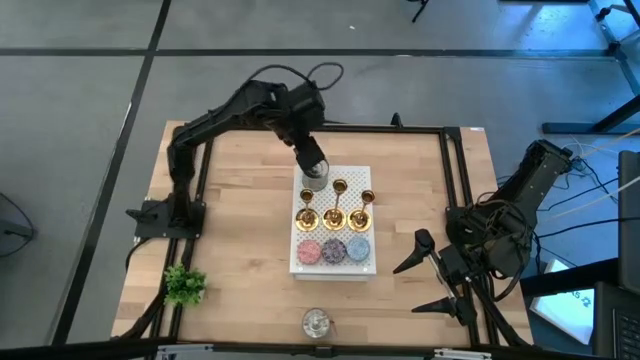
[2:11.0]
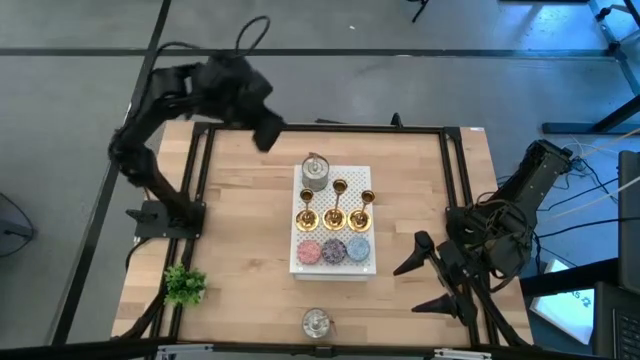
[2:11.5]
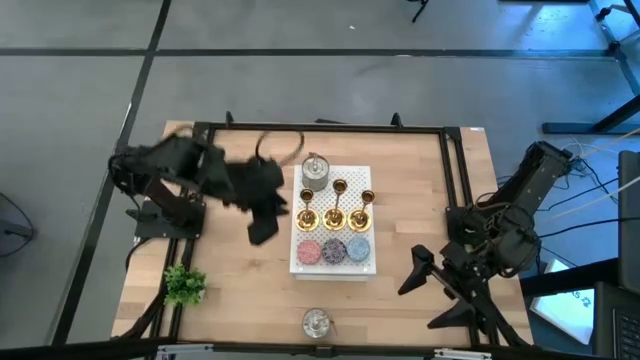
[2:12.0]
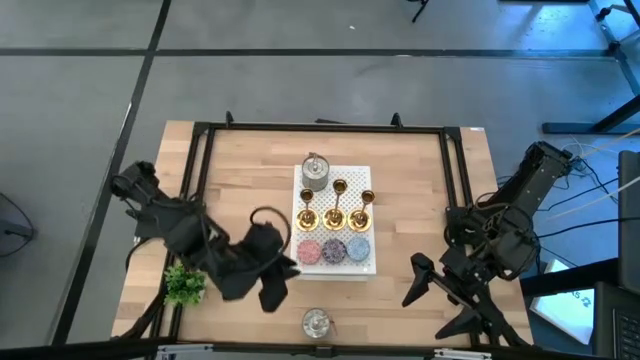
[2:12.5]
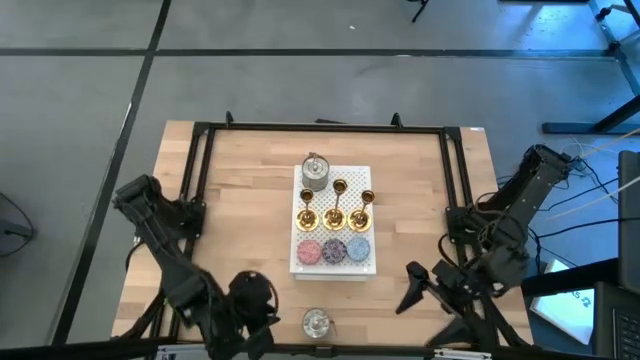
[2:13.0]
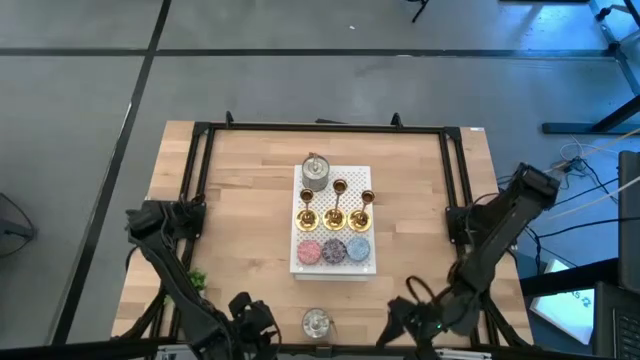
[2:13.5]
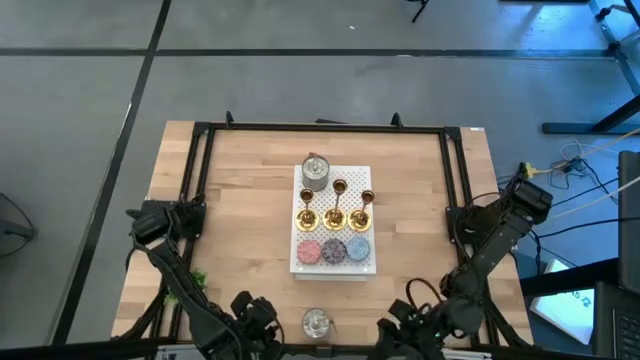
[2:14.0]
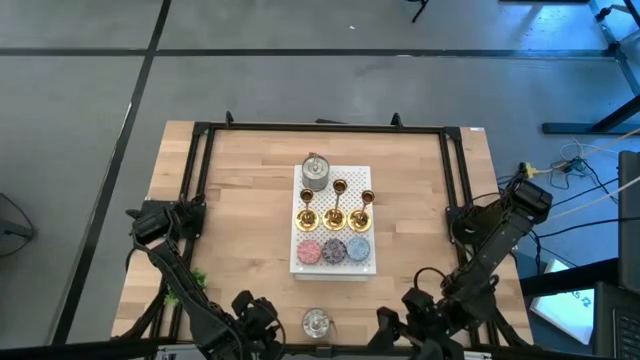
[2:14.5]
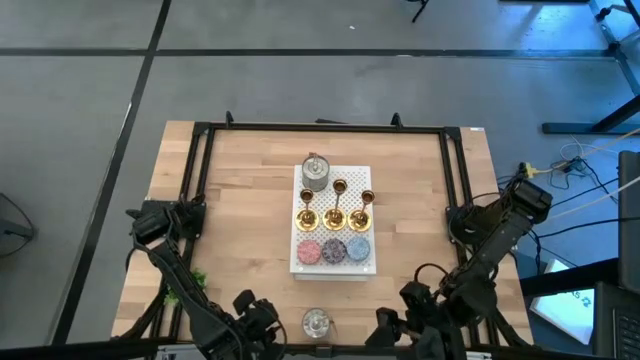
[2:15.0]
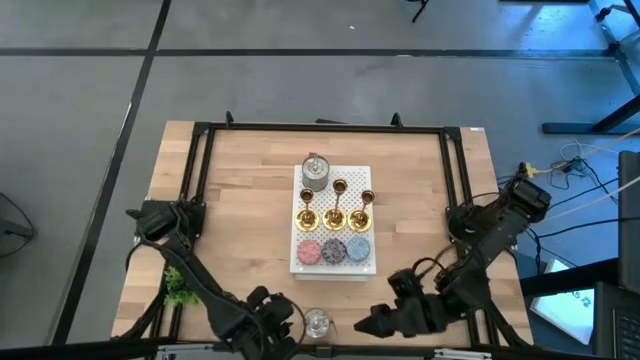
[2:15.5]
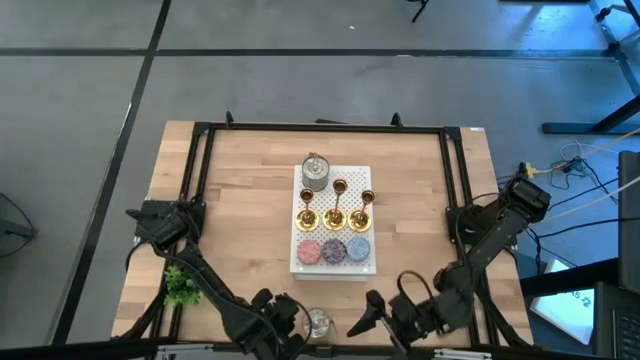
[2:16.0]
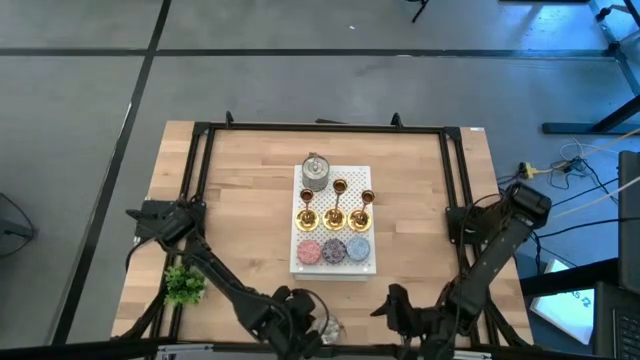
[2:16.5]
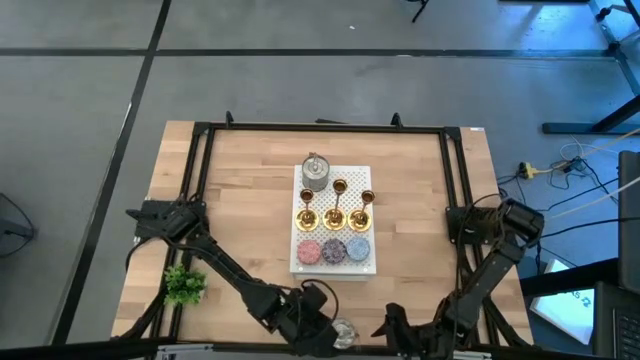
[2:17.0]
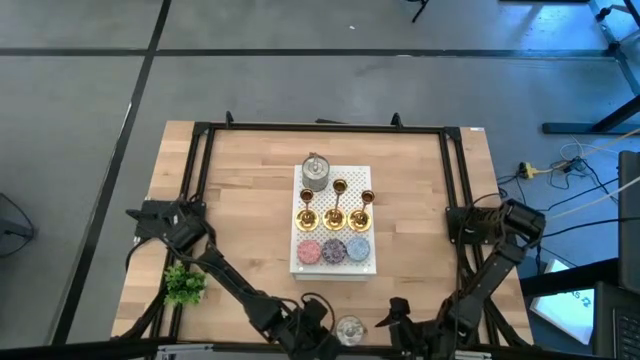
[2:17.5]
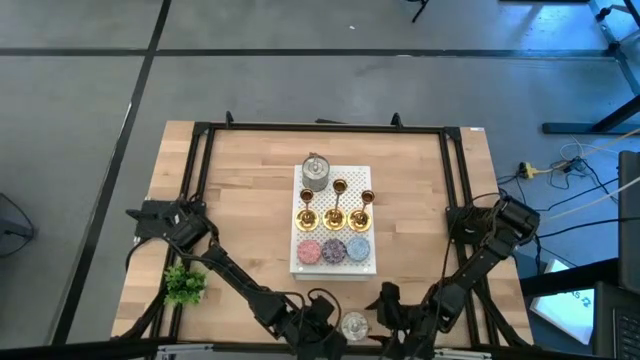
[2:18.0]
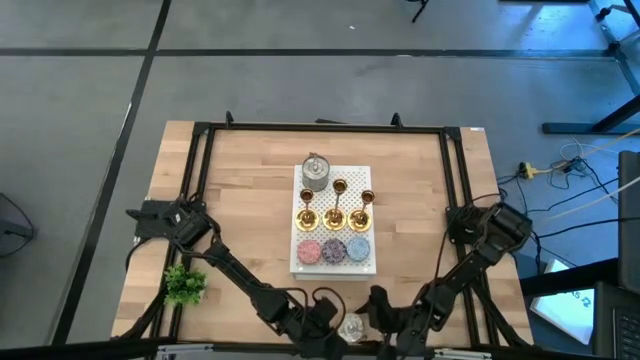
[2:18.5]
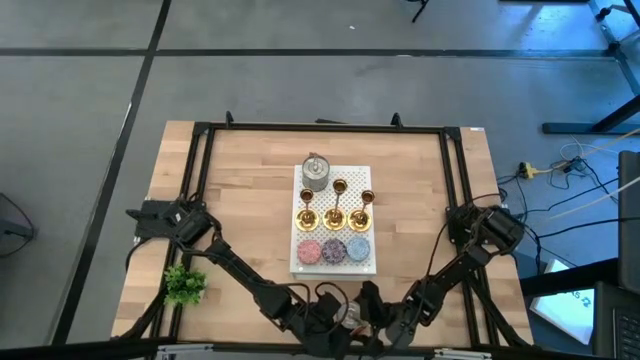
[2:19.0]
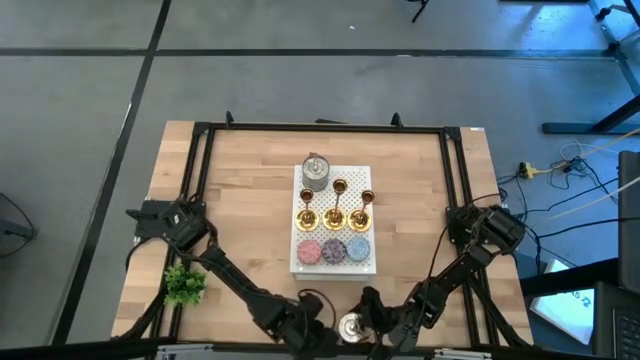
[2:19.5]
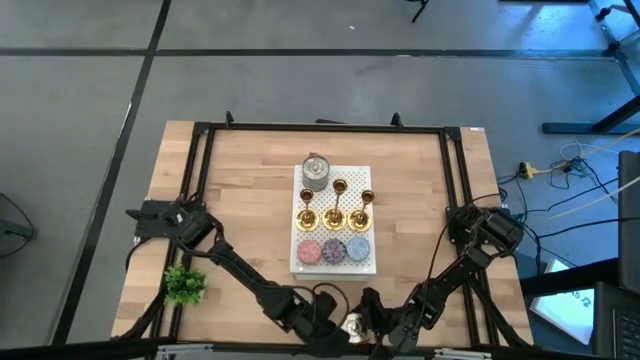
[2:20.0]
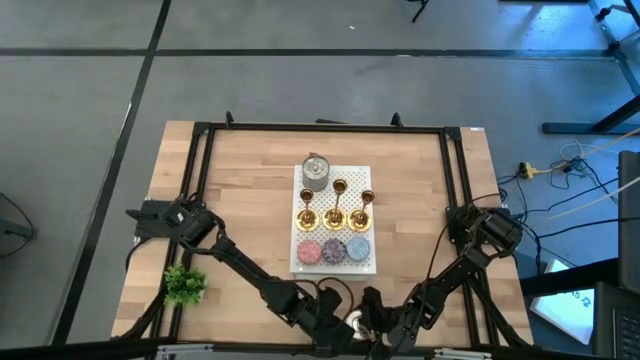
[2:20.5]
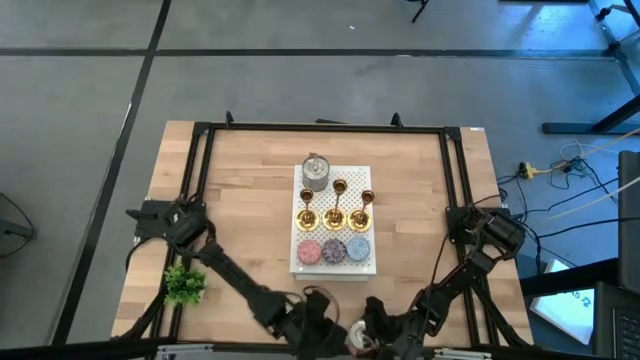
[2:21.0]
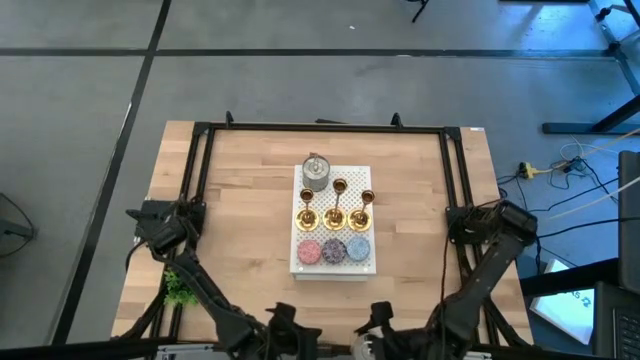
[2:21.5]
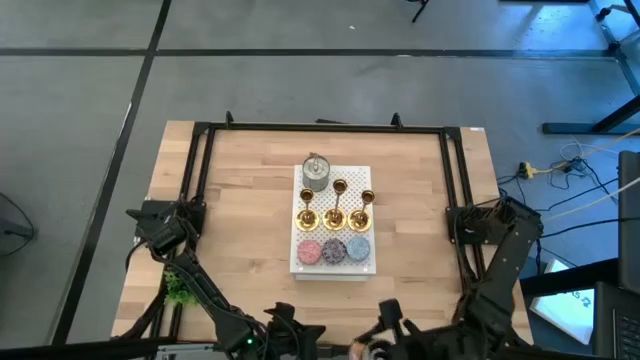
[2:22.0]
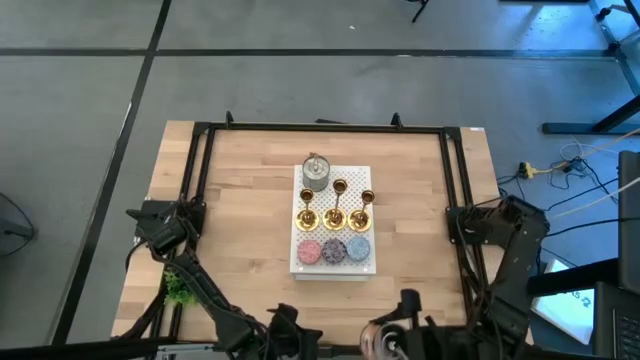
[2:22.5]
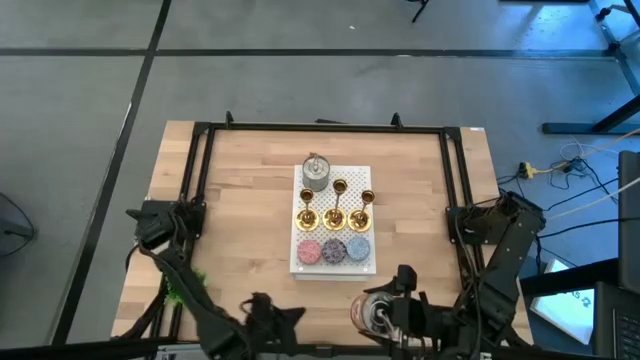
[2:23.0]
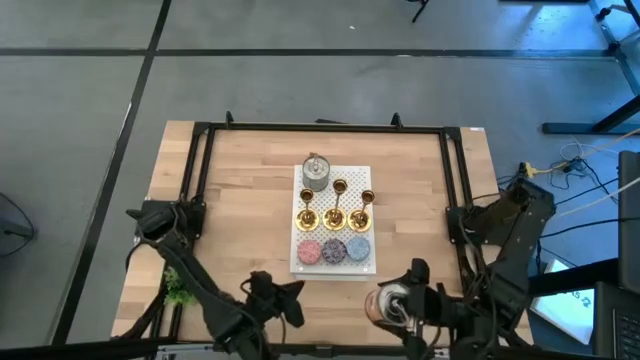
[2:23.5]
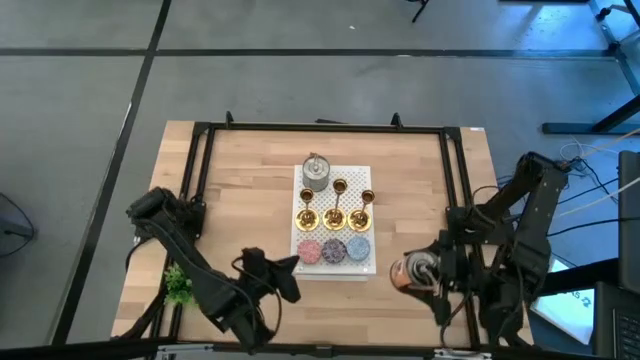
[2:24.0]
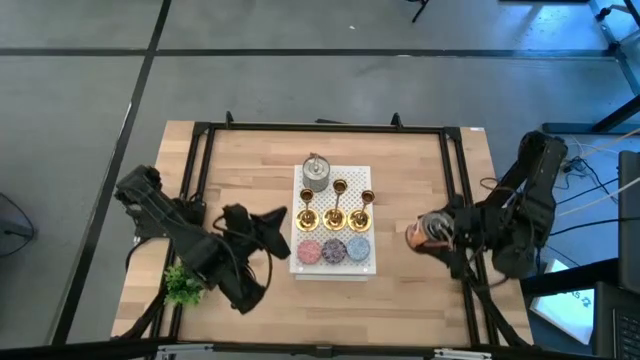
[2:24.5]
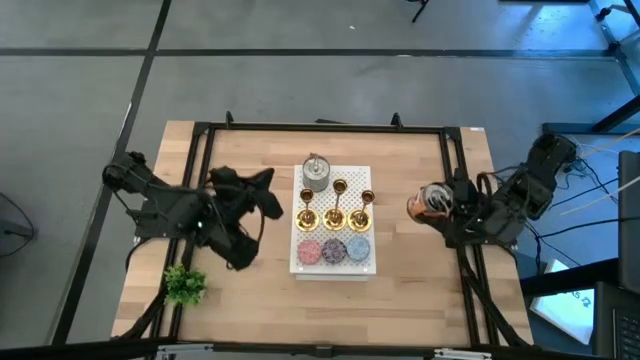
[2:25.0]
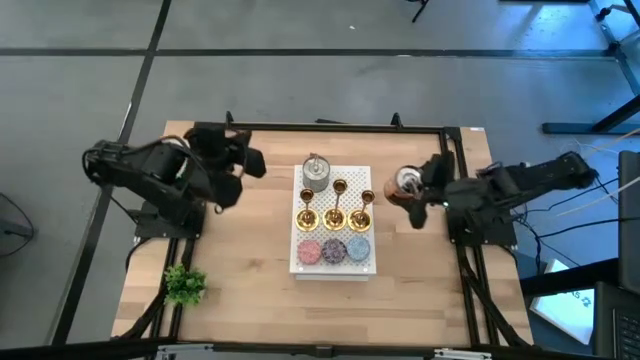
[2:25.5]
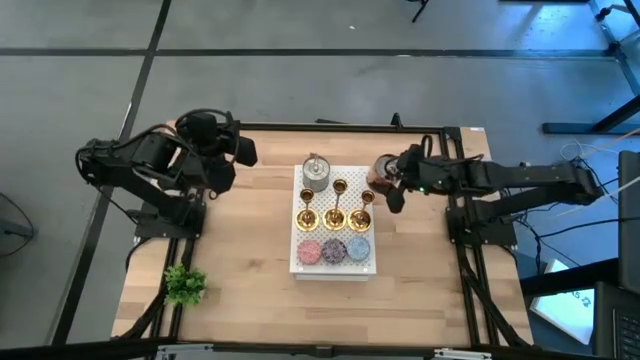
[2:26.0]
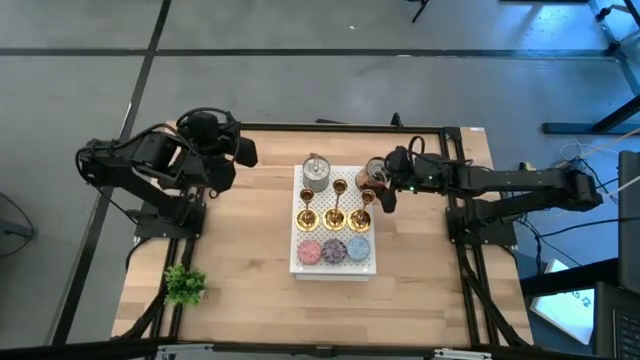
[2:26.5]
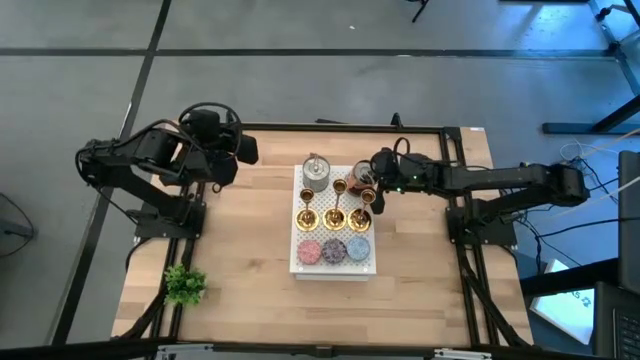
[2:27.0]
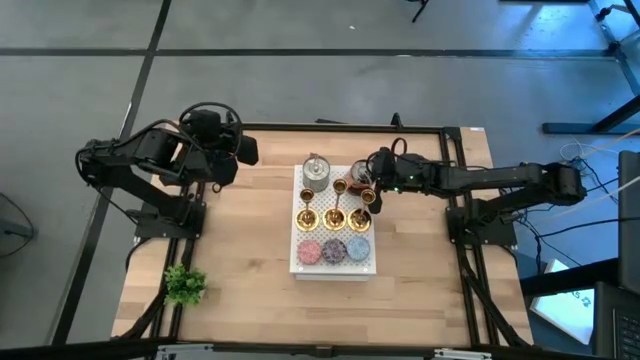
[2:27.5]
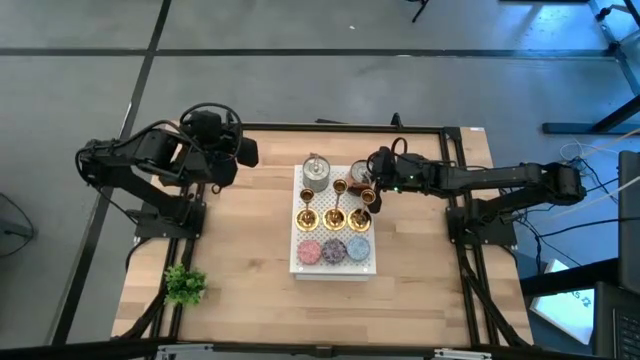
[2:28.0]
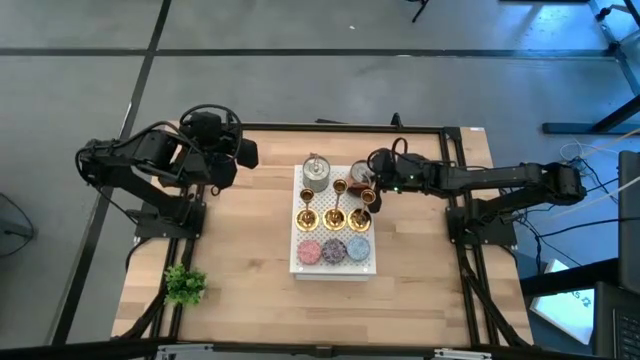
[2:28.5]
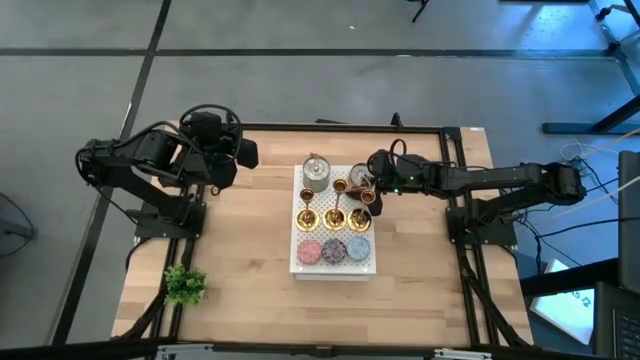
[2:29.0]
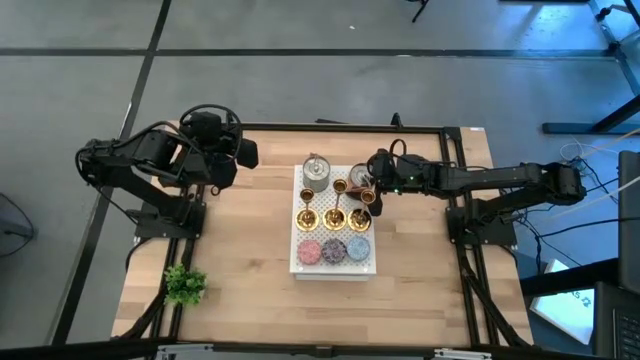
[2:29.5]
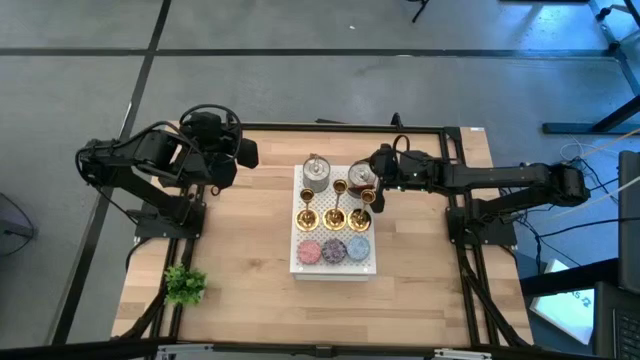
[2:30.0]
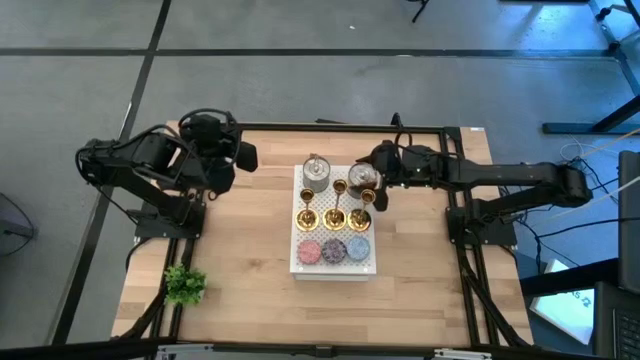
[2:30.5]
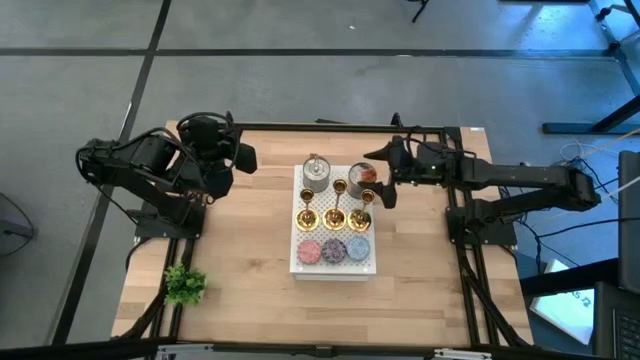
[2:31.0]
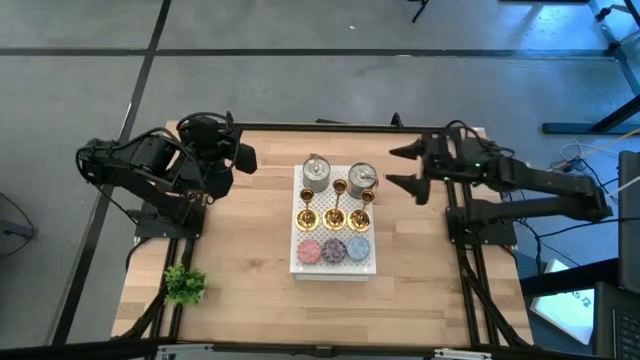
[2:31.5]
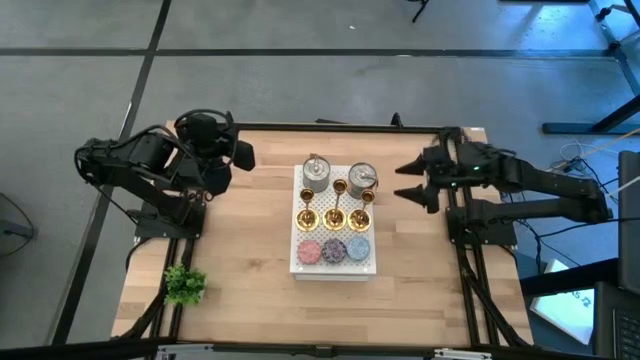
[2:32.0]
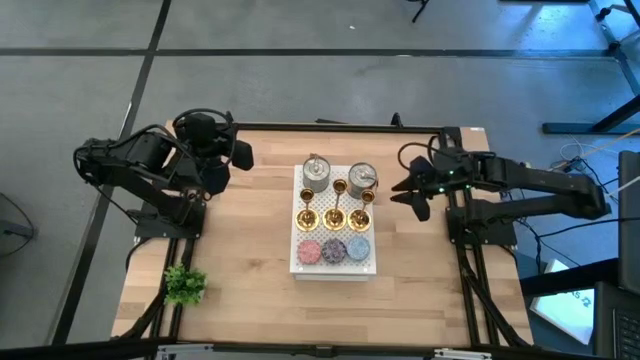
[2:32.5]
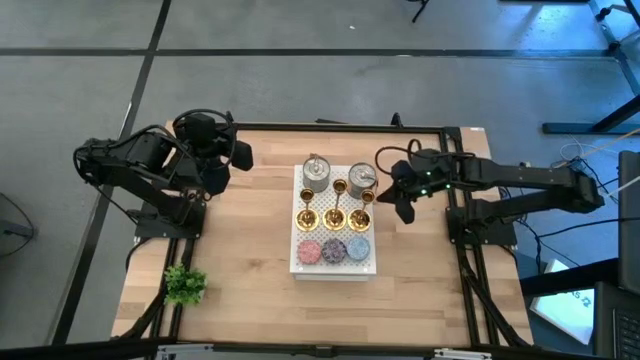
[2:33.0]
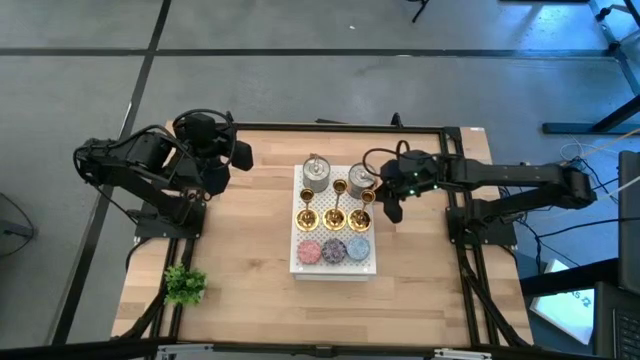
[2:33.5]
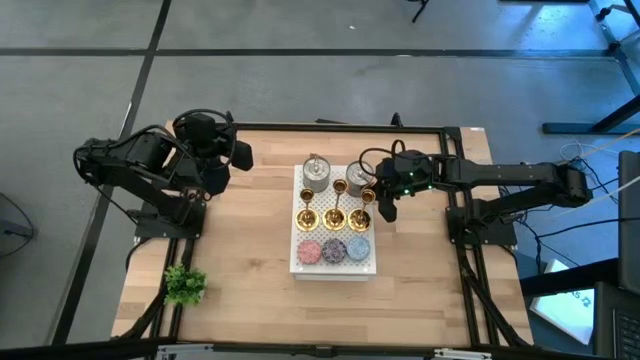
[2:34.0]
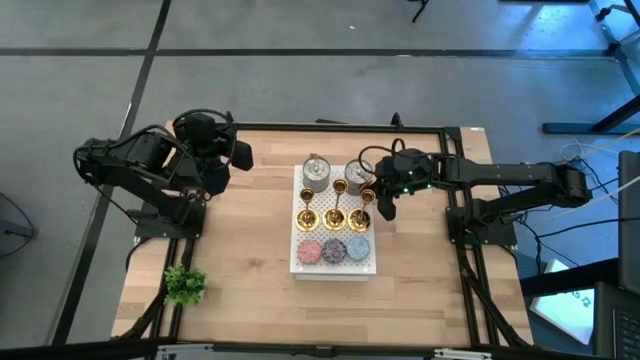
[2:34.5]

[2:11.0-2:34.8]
Task: Pick & Place candle stick holders
Put the silver scented candle on the shelf aligned with the other silver scented candle
